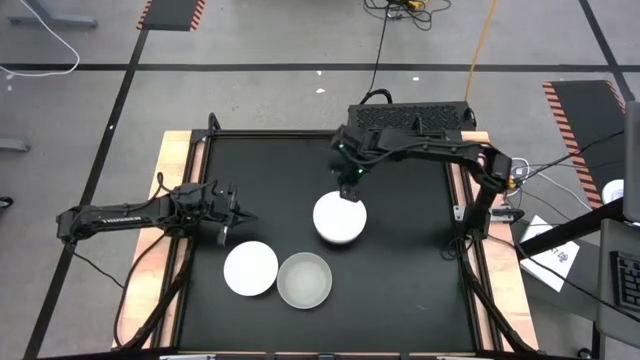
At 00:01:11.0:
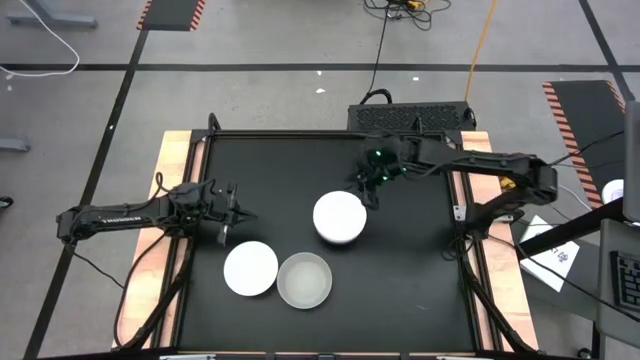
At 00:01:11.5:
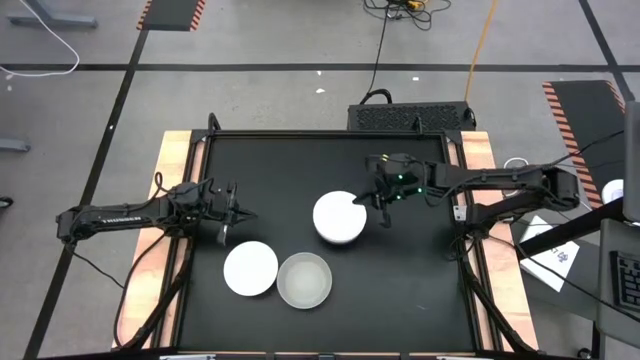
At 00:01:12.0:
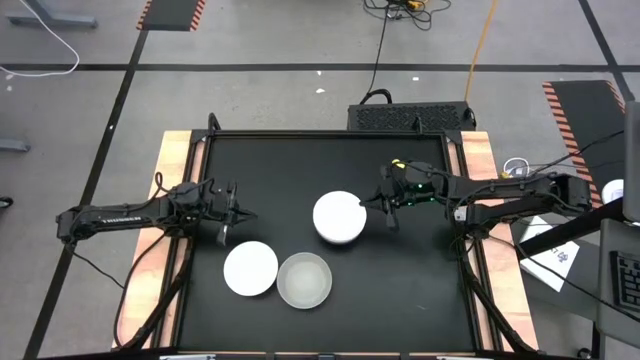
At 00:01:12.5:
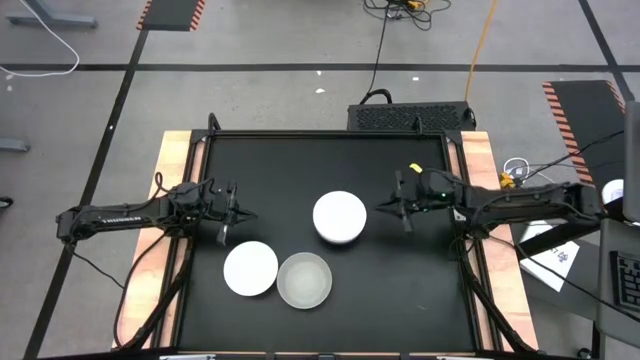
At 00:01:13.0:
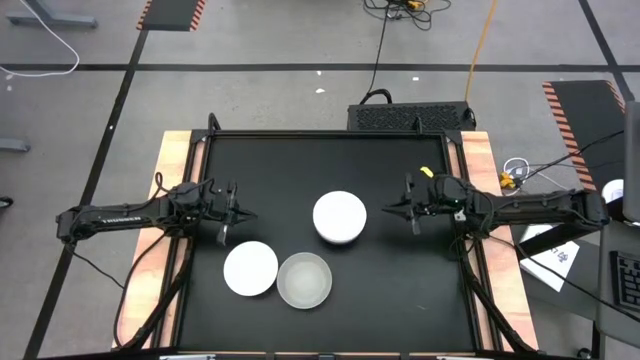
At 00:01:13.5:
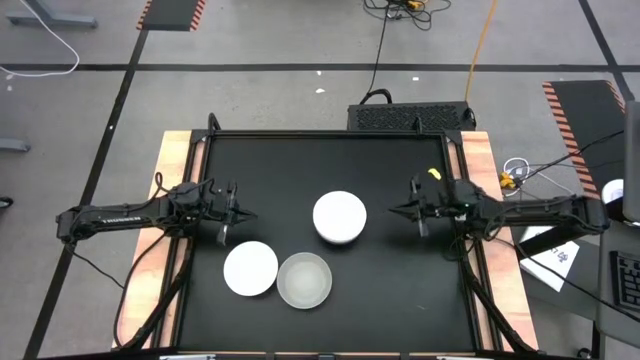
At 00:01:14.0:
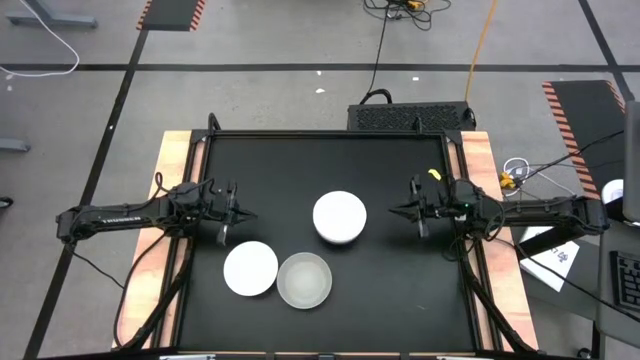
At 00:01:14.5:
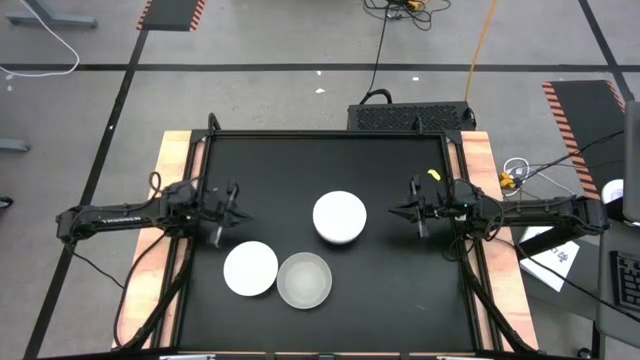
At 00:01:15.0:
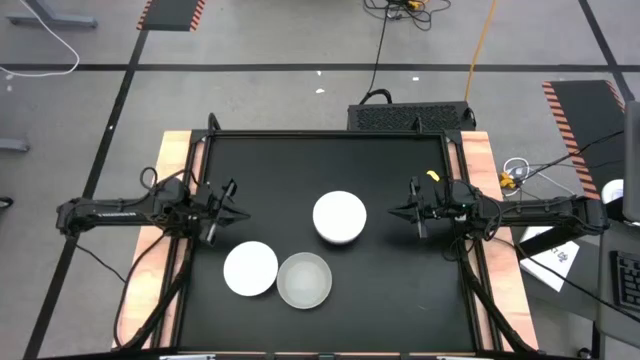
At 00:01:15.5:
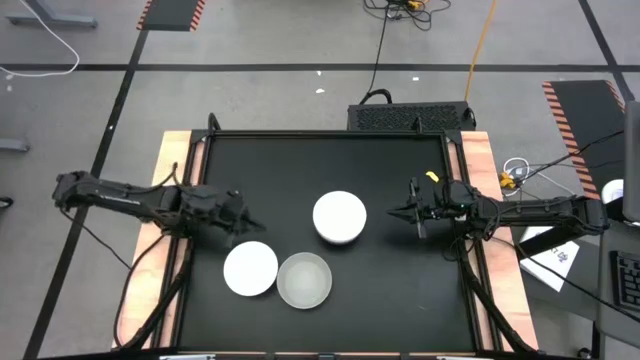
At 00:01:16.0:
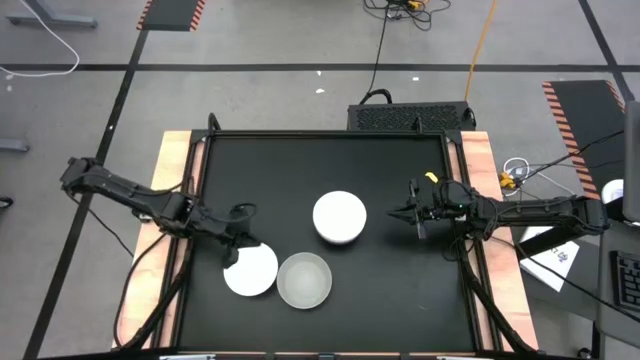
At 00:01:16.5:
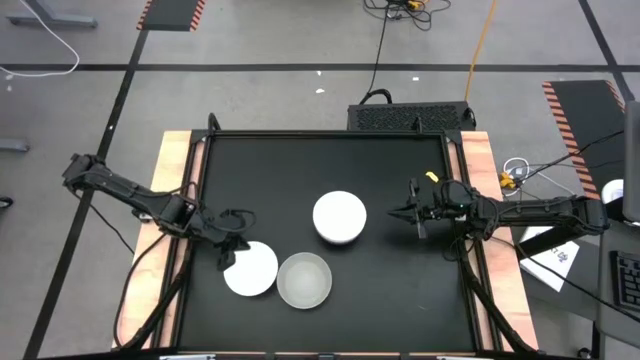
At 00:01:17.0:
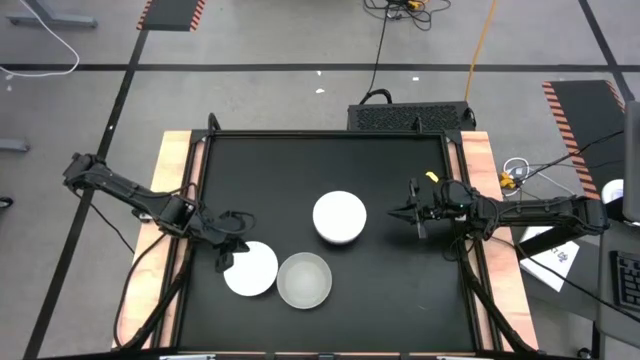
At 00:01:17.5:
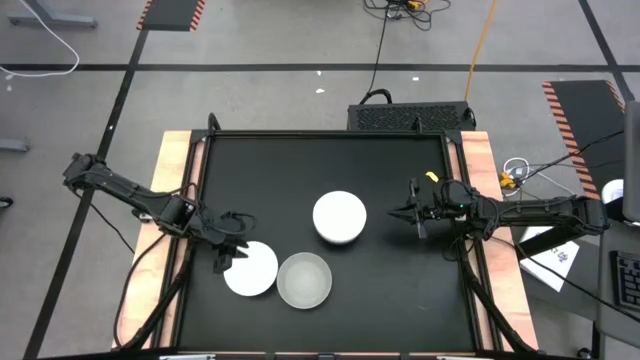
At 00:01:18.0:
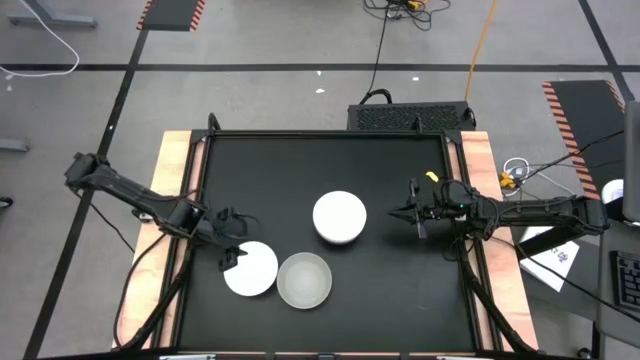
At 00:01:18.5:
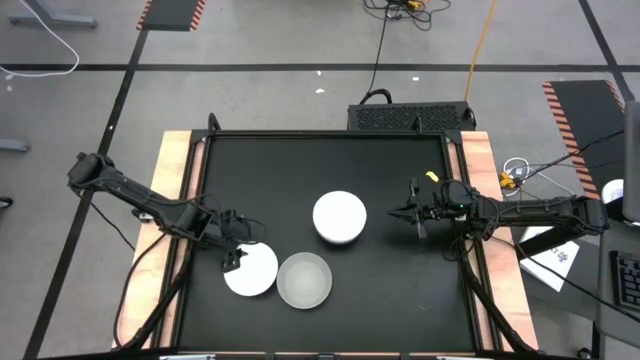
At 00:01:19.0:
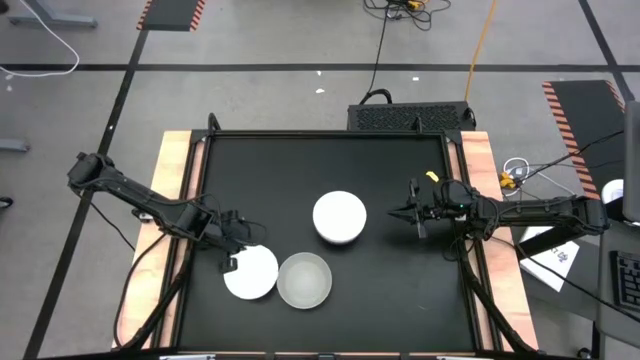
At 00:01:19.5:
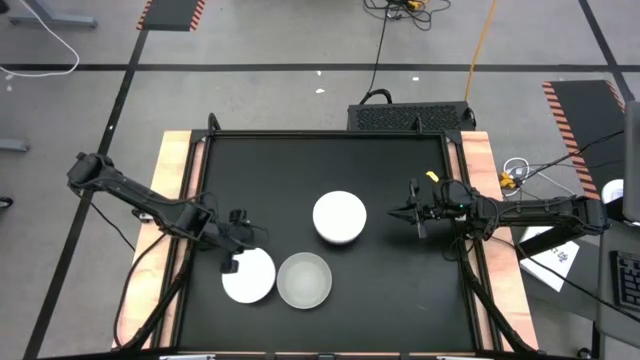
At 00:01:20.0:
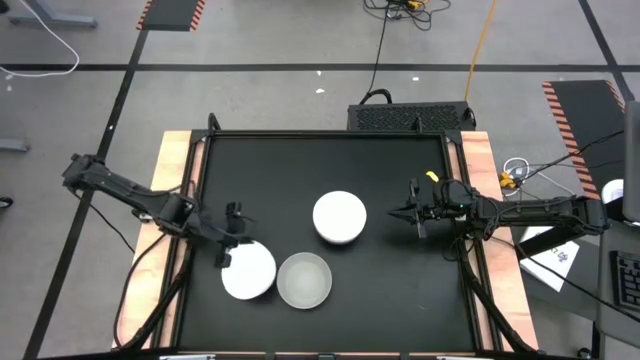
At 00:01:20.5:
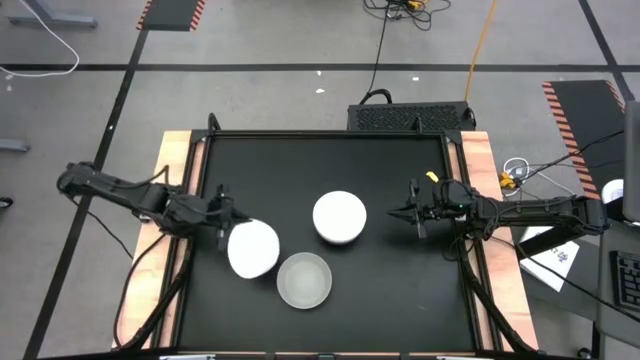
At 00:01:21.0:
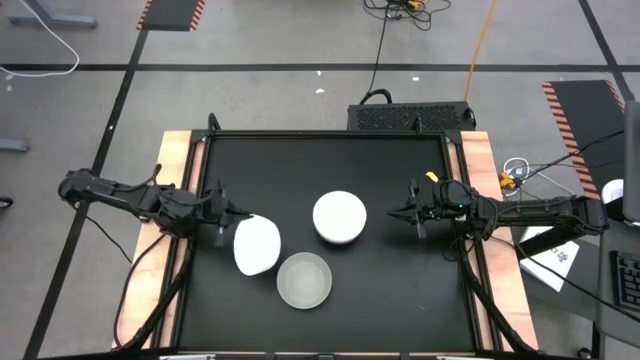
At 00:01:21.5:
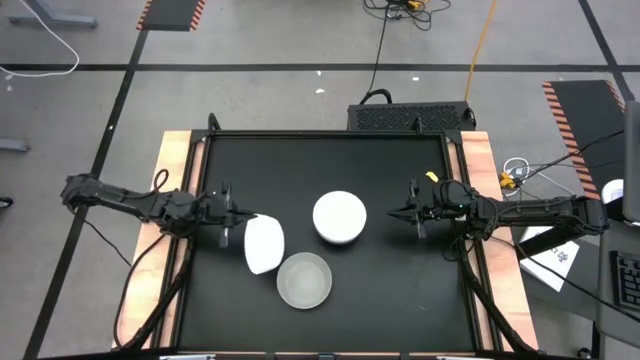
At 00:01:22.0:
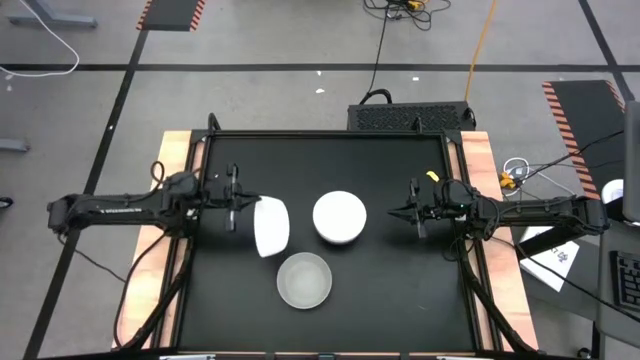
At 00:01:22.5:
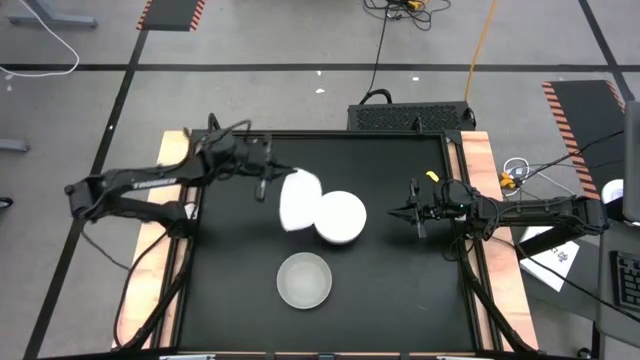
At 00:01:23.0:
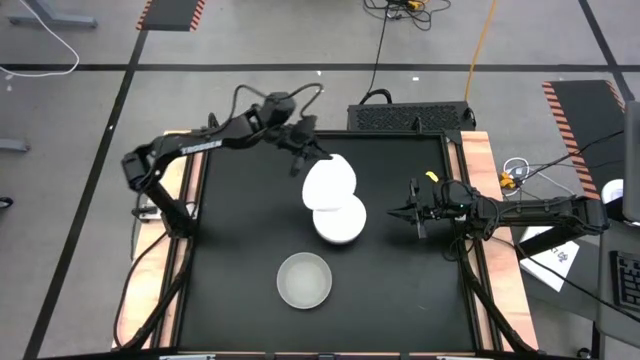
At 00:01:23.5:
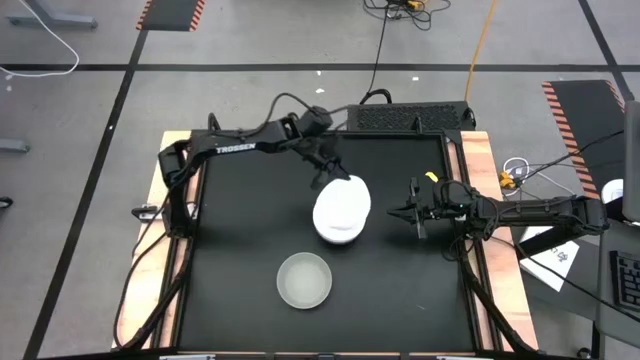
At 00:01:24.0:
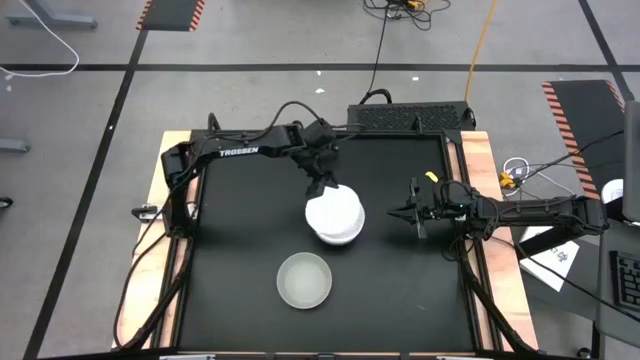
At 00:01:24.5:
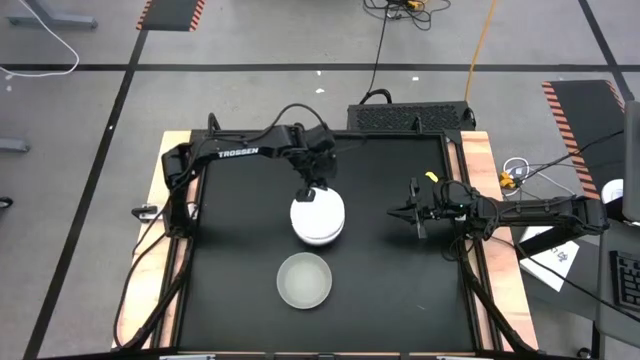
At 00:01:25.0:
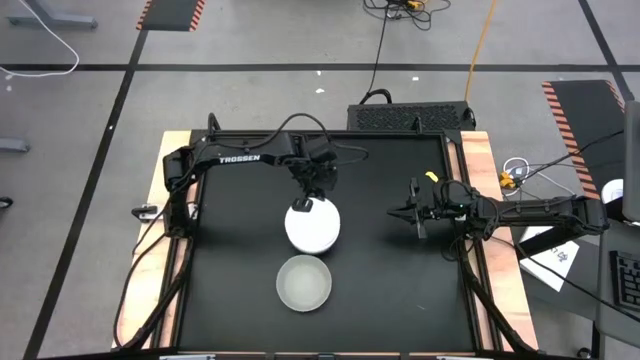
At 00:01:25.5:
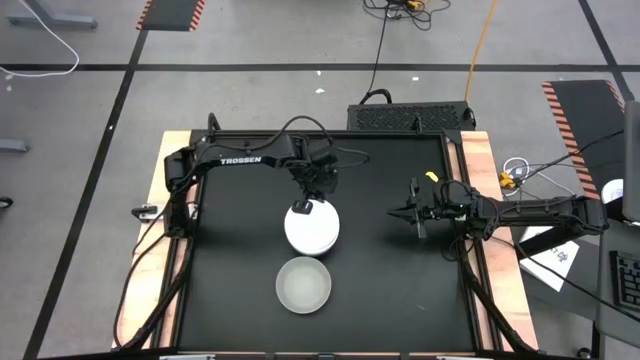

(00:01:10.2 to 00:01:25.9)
Task: Nest bowls inside each other
Stack the white bowl on the white bowl

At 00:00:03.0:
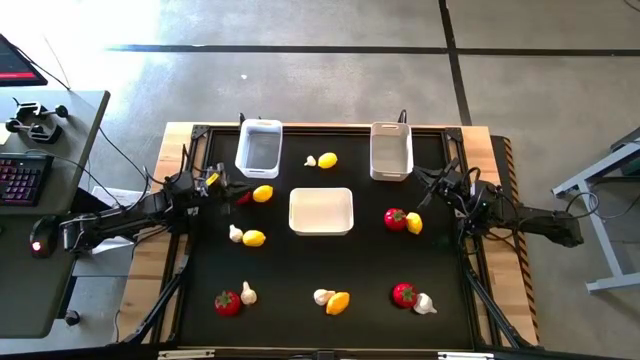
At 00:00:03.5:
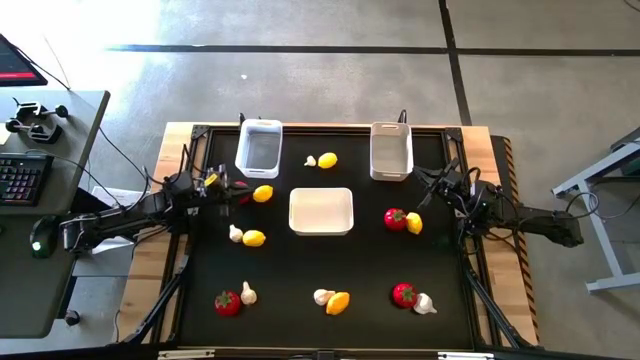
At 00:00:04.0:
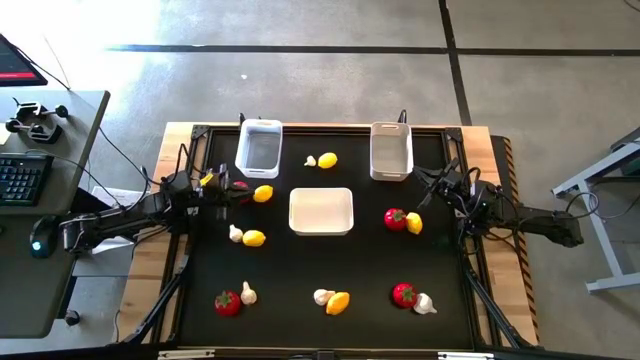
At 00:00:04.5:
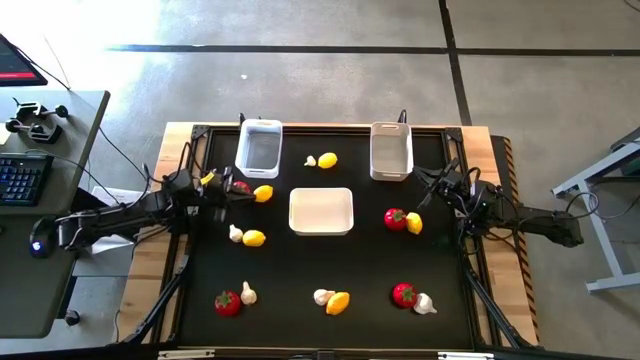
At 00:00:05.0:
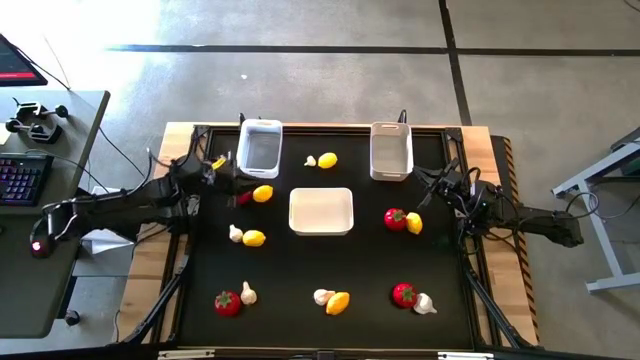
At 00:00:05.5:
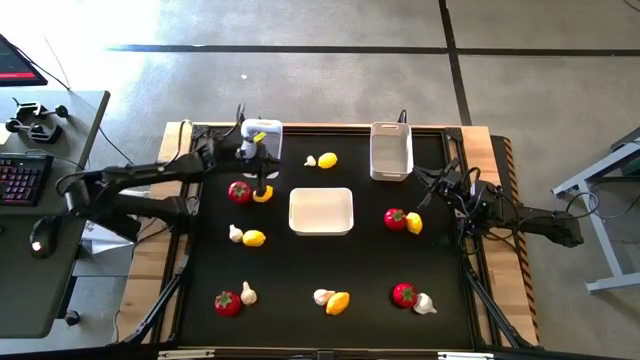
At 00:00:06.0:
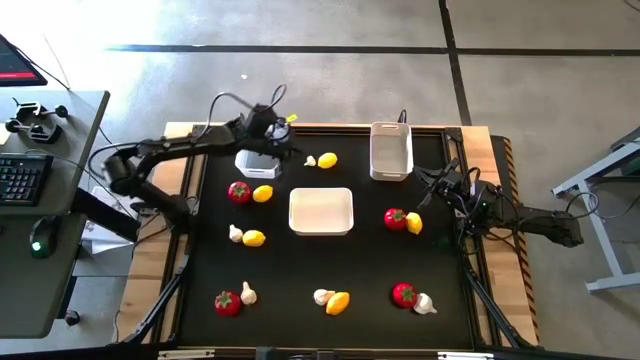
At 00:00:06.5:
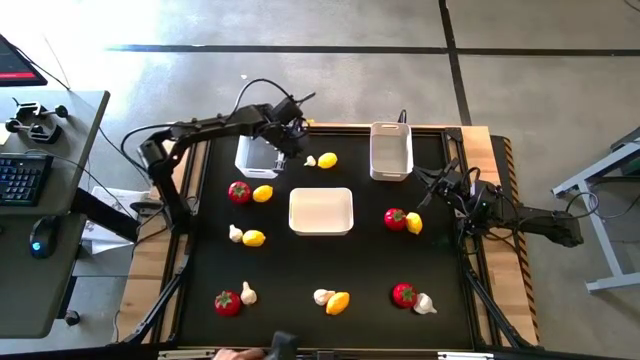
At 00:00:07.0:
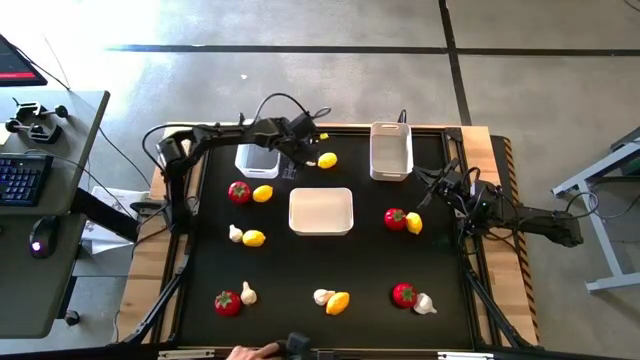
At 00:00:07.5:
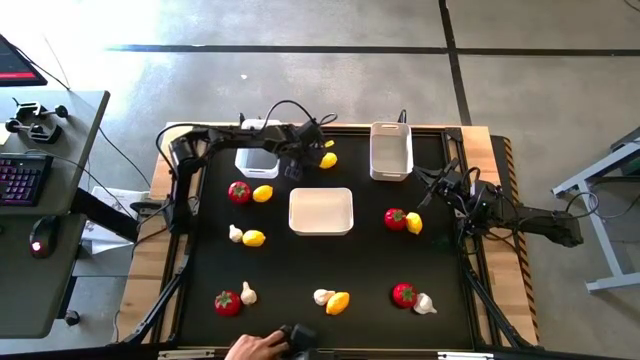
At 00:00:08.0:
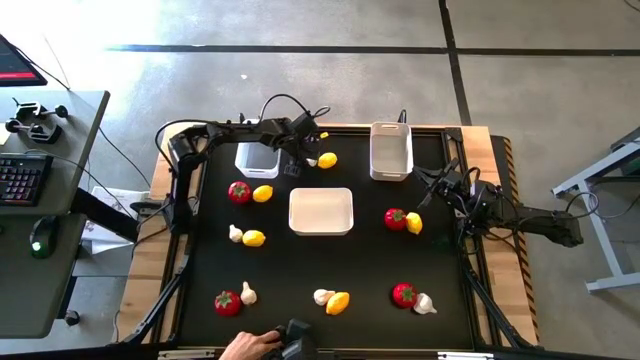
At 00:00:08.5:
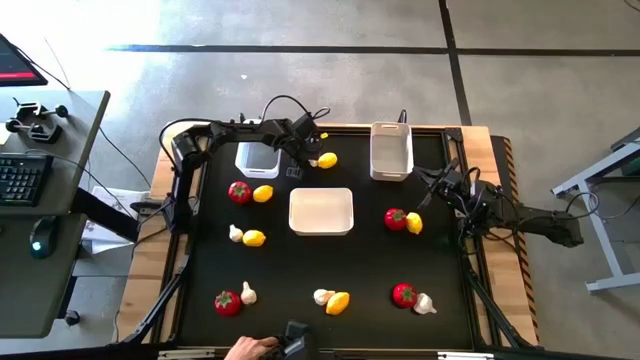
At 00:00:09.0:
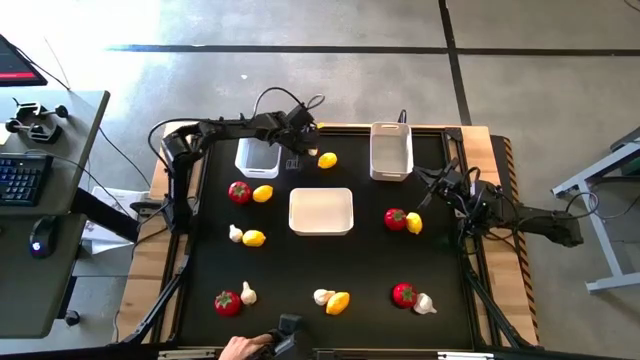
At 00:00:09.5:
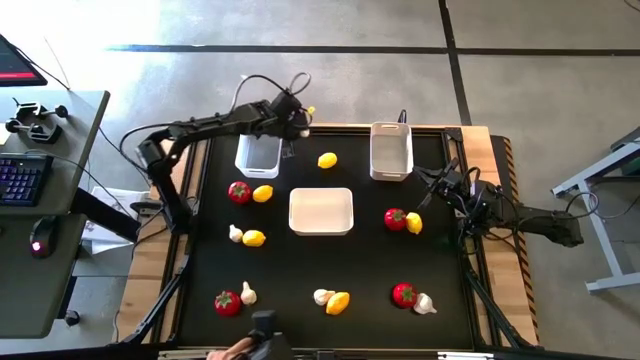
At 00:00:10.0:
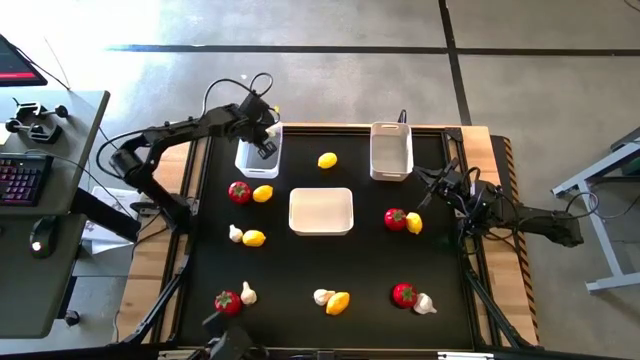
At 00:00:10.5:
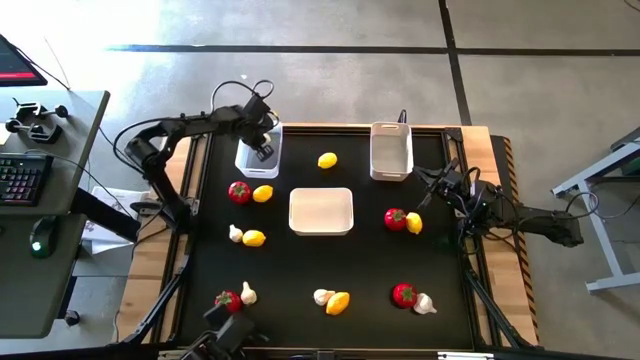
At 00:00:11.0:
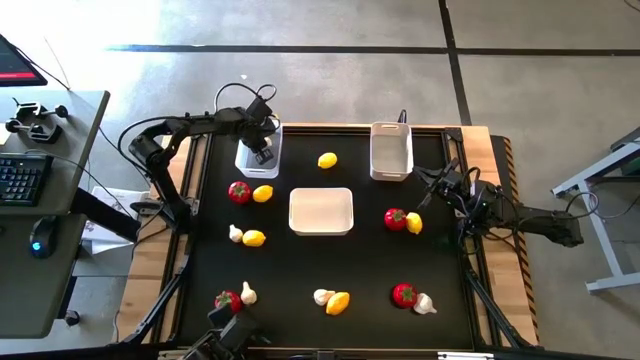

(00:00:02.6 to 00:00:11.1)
Task: Sort produce into baskets
Put the white garlic into the transparent bin
